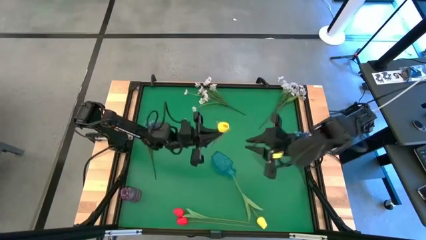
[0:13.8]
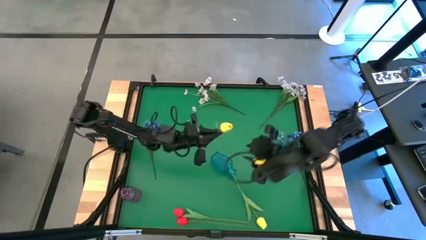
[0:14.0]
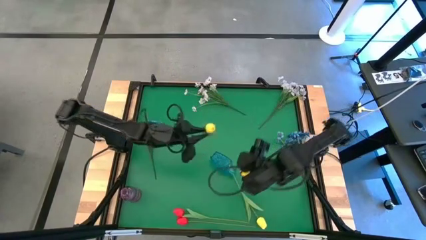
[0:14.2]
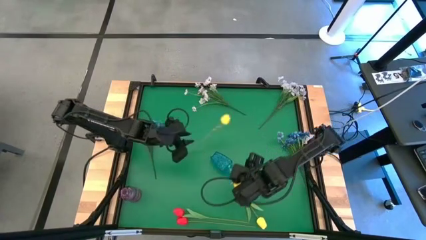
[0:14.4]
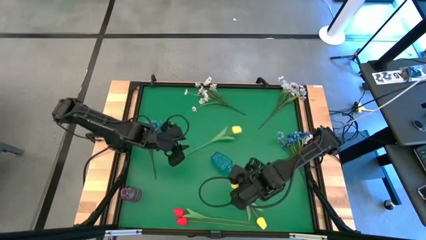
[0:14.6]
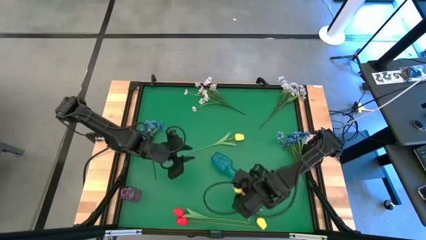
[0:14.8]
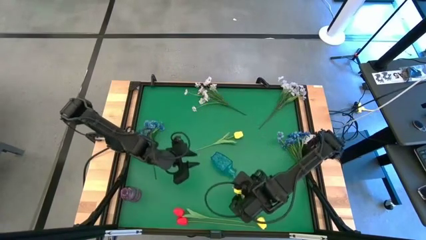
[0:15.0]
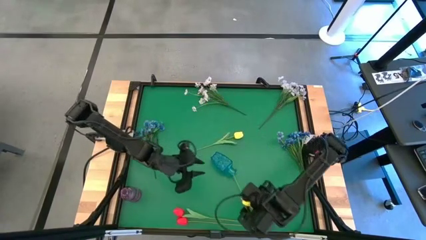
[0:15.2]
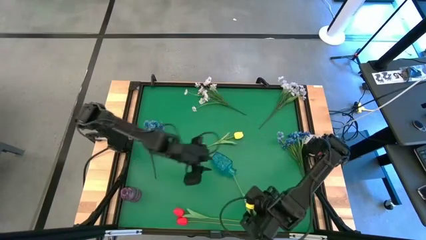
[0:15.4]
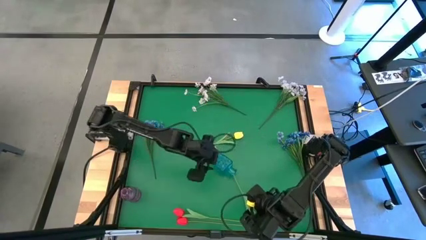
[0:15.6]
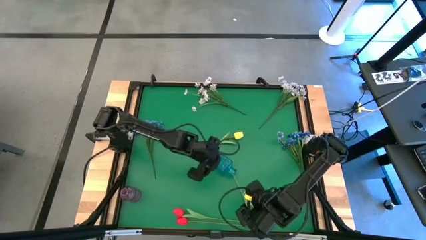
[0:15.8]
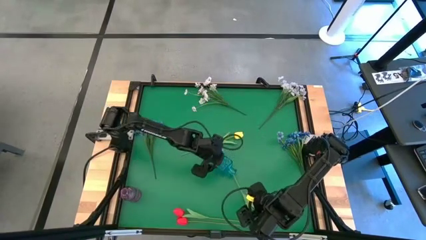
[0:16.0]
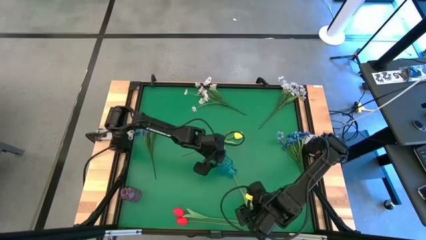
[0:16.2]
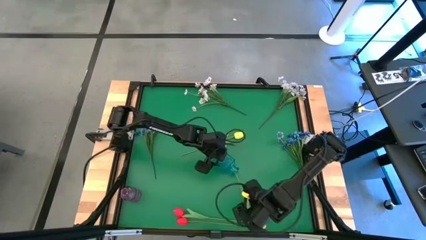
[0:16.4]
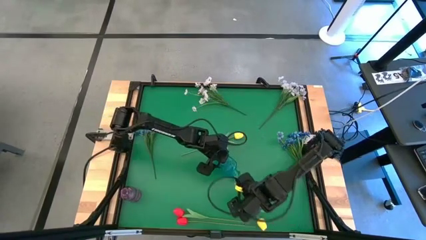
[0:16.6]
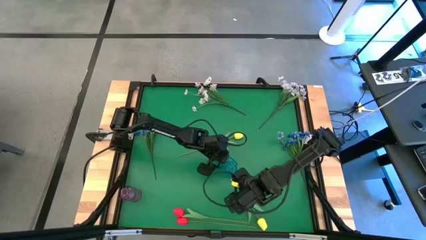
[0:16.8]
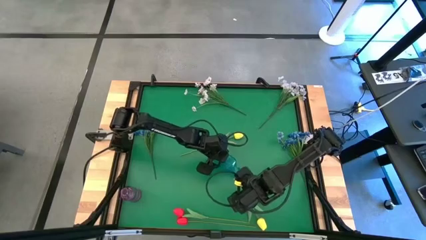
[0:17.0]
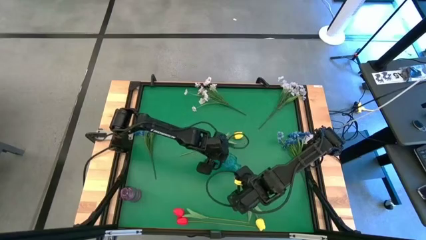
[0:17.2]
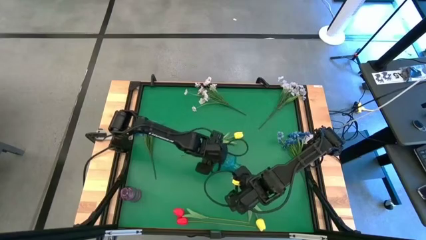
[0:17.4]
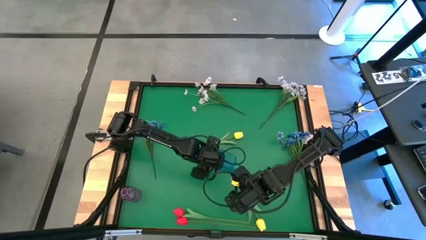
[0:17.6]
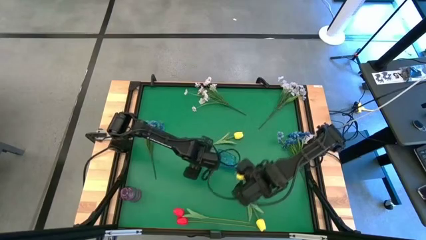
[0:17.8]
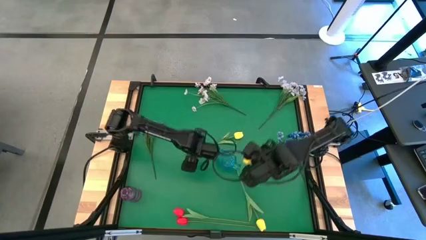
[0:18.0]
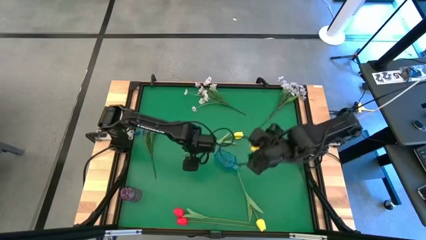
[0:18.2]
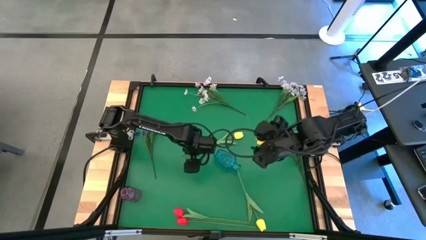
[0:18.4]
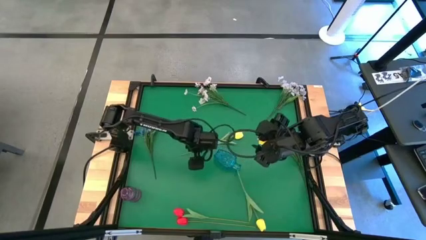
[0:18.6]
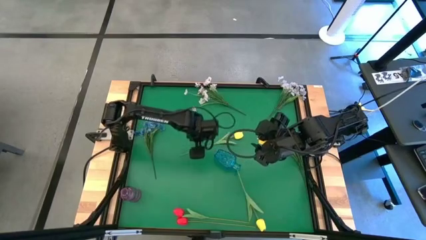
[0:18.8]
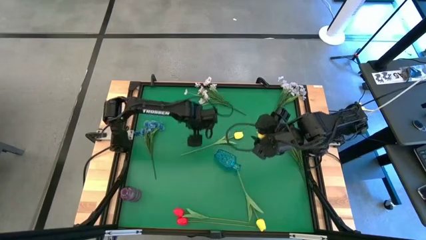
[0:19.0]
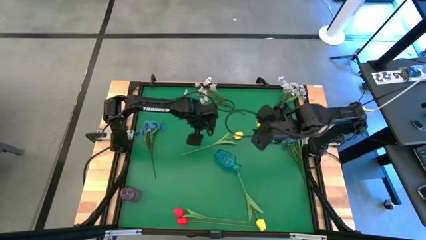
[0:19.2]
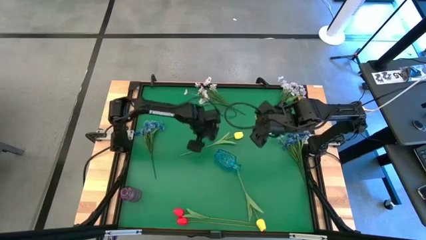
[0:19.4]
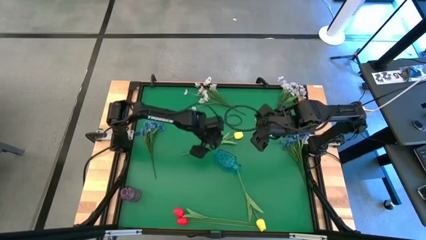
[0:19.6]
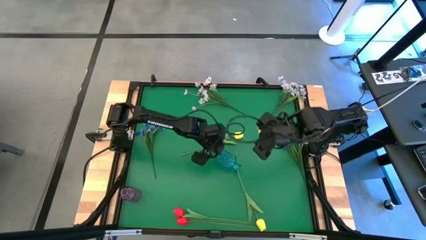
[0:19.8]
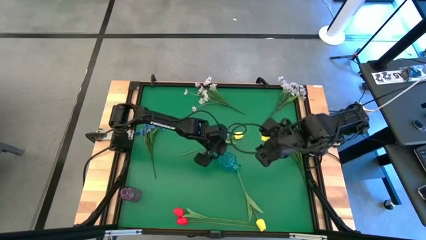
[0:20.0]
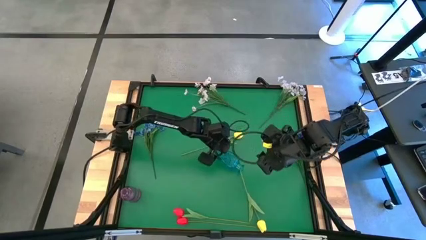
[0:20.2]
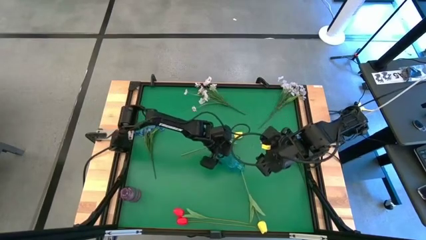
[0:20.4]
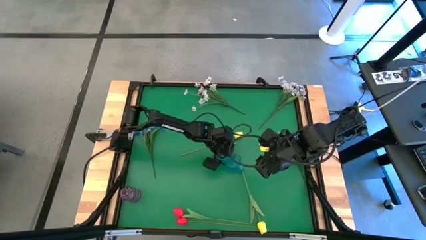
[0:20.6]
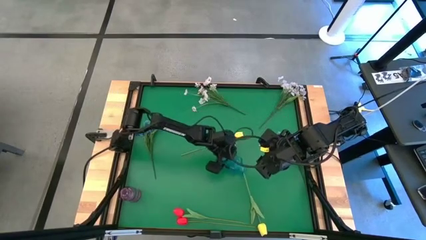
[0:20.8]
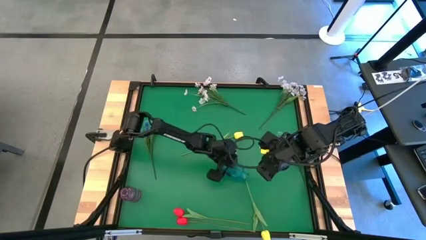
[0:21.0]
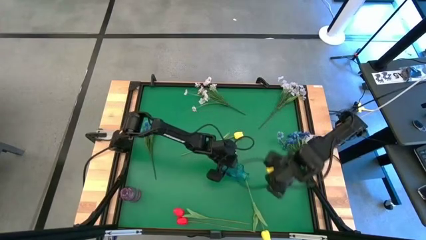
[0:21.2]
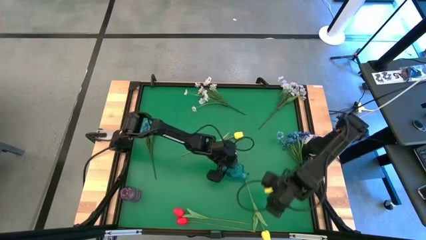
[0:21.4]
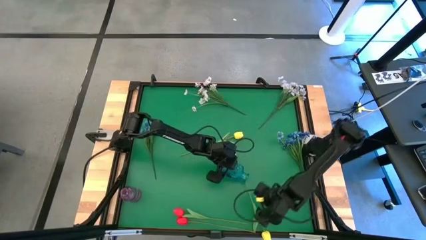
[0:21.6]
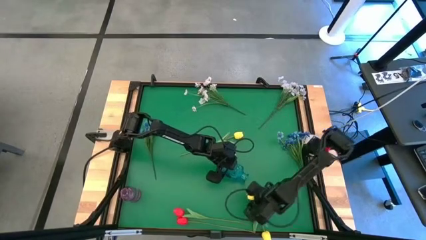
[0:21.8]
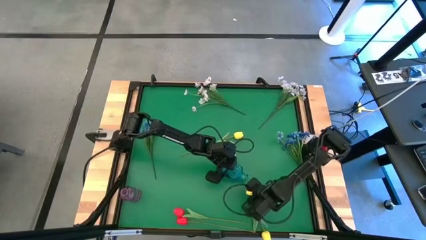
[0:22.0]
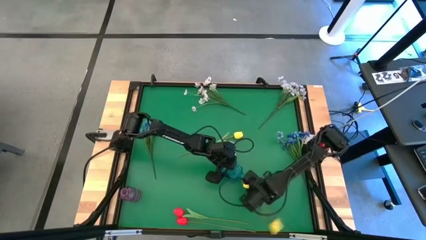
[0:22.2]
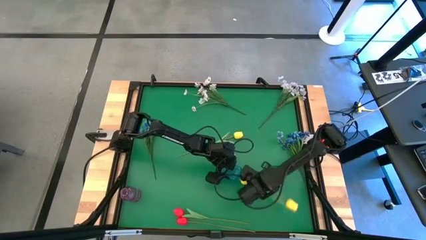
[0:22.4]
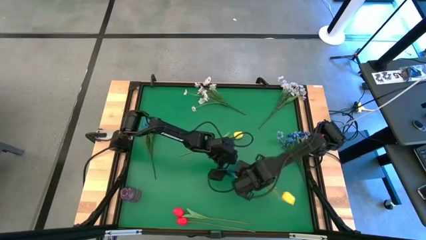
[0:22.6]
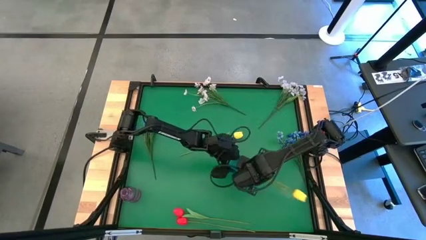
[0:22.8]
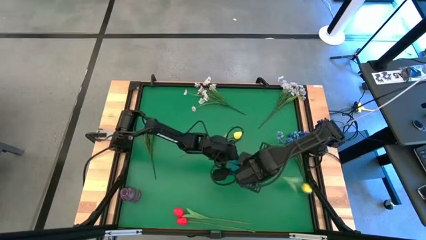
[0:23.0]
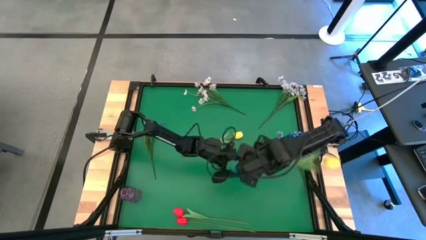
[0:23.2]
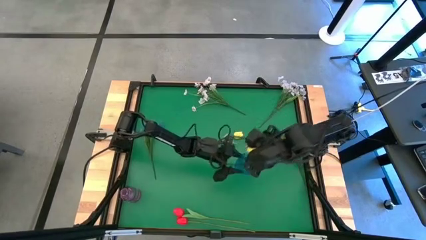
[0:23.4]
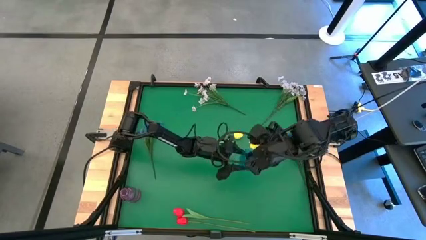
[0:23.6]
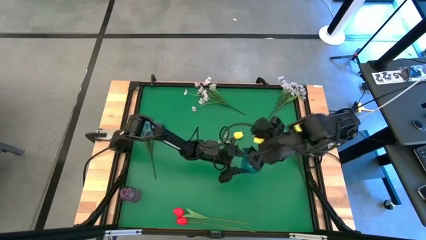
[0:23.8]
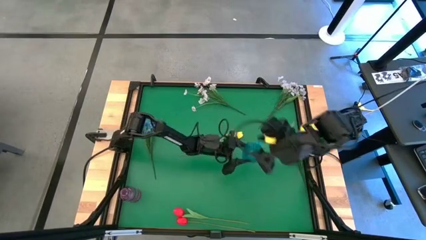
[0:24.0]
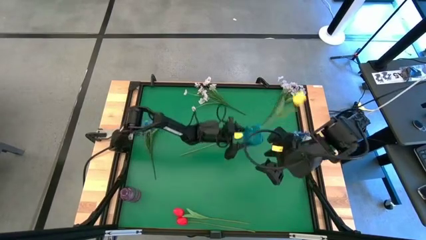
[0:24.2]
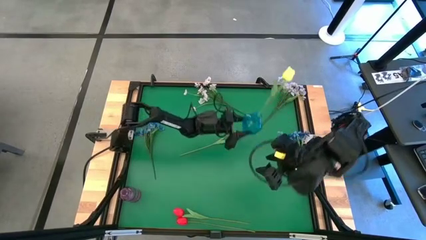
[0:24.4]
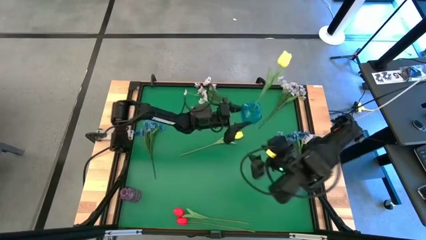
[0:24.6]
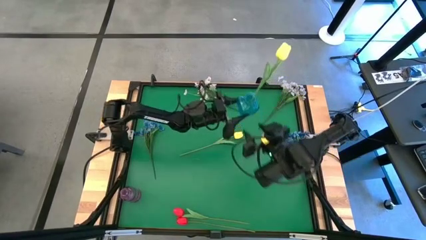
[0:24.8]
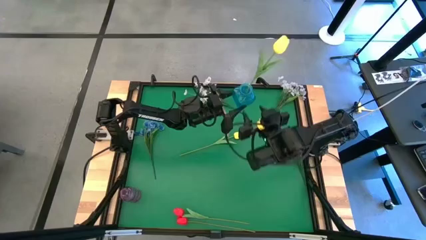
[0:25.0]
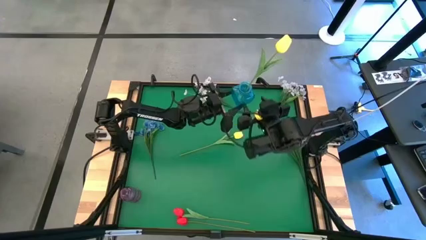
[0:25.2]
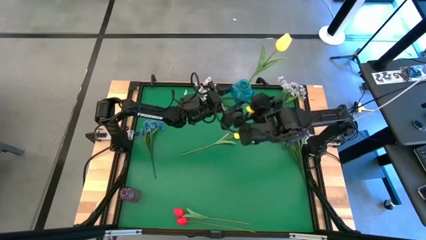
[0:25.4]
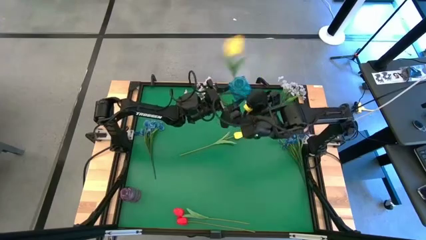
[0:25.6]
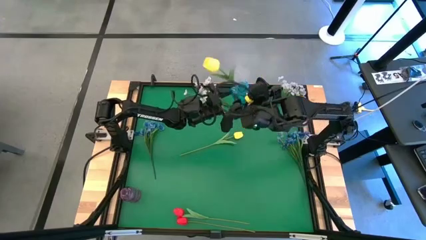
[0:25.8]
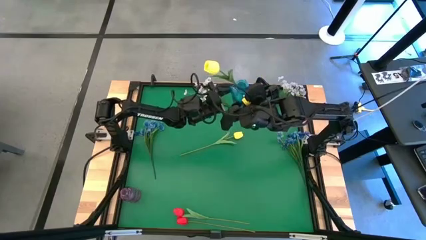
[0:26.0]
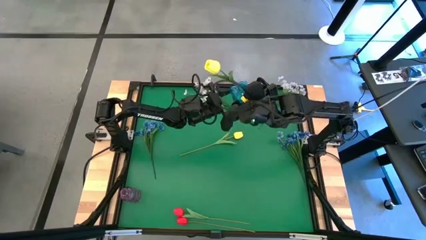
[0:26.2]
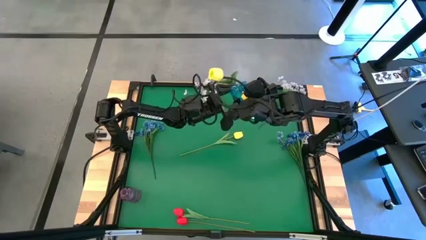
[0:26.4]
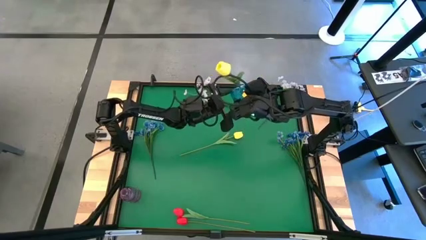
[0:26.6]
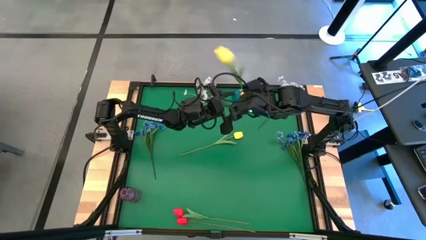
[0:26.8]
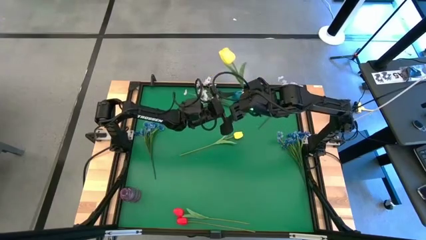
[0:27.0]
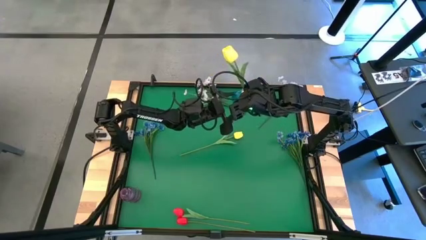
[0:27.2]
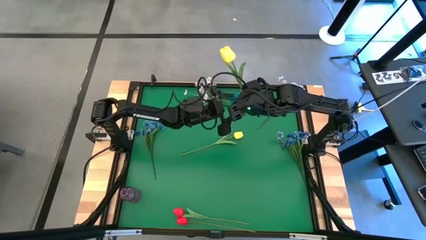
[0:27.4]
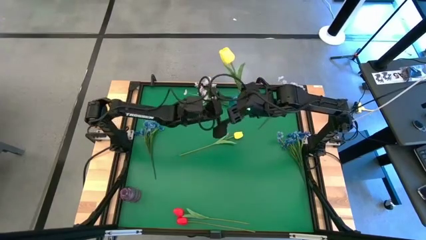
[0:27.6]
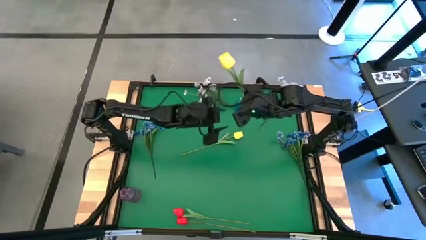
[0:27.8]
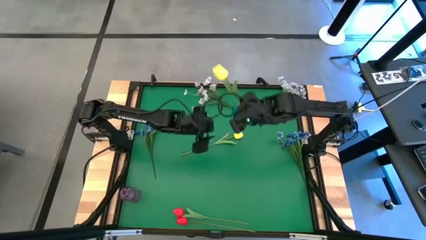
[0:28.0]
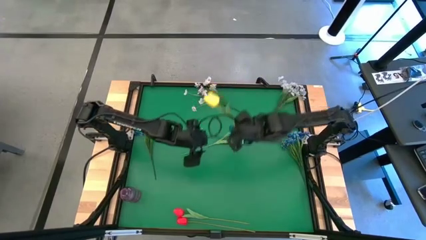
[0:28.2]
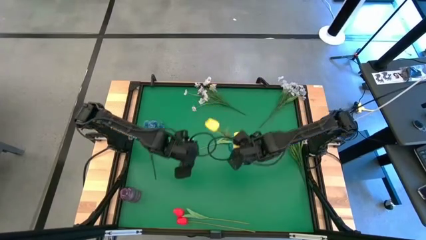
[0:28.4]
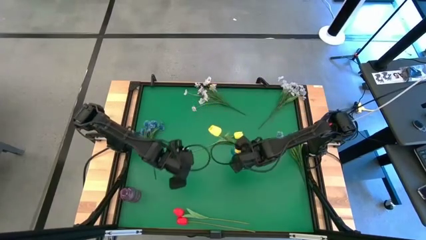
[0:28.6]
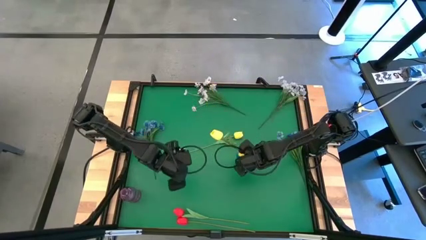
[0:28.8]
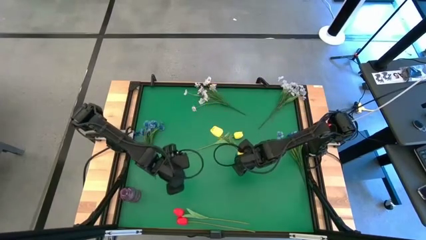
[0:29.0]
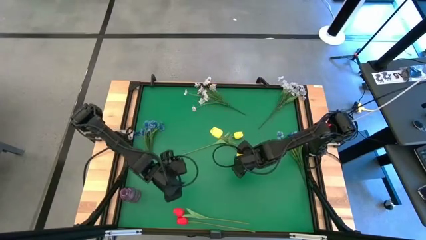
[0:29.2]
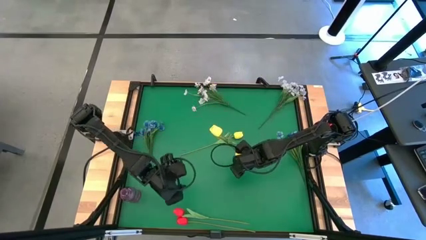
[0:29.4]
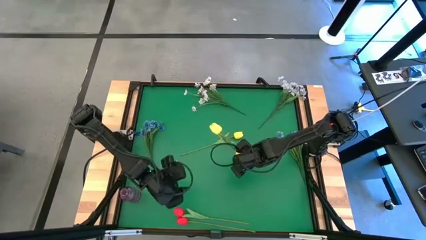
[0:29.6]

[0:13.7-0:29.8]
Task: Sort flowers into vase by color
Adjust the blue vase
